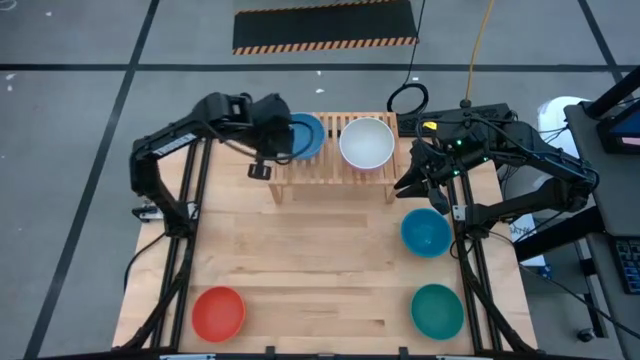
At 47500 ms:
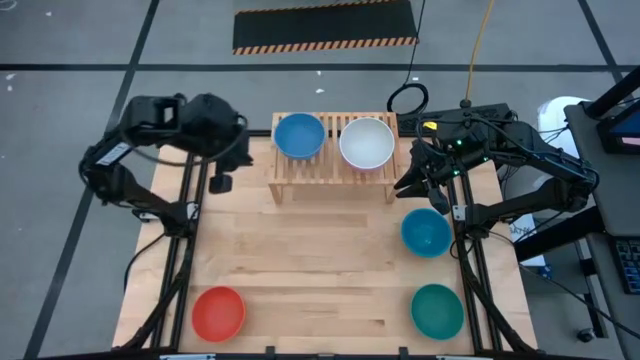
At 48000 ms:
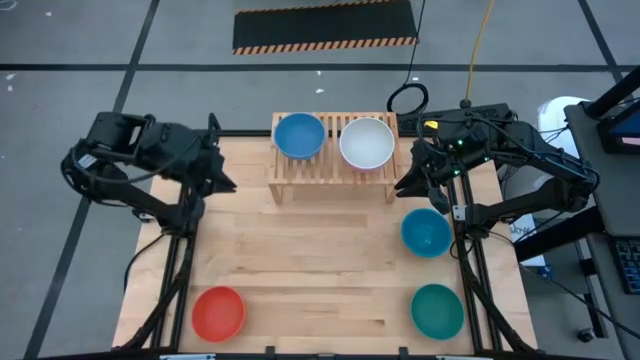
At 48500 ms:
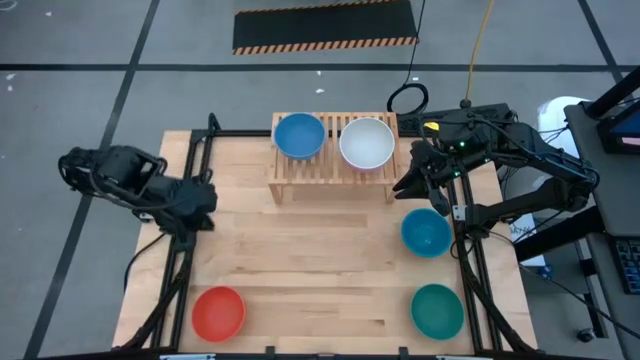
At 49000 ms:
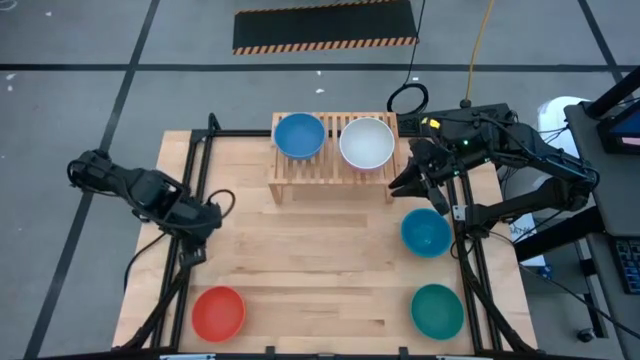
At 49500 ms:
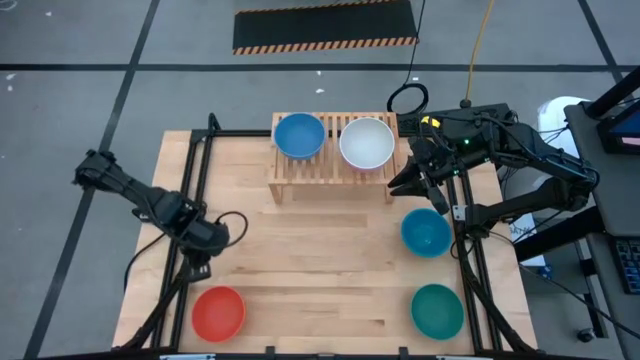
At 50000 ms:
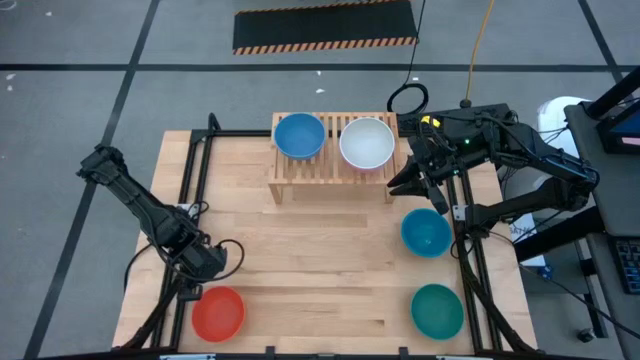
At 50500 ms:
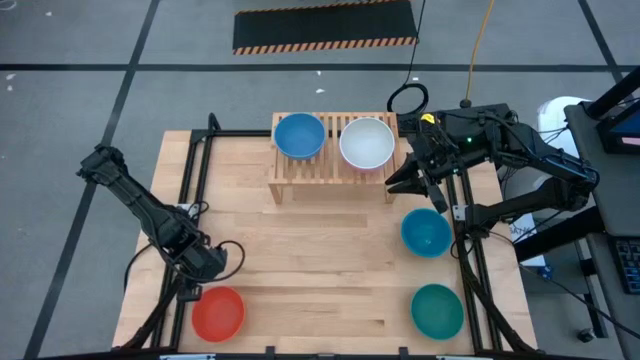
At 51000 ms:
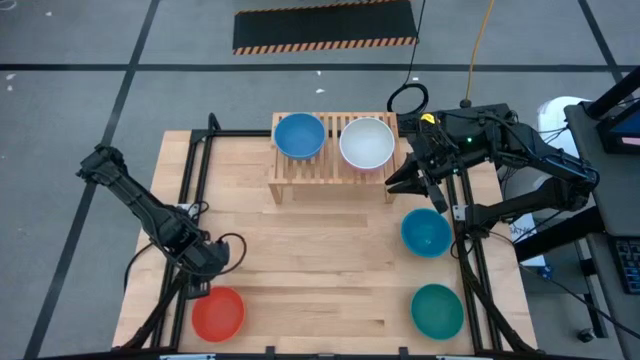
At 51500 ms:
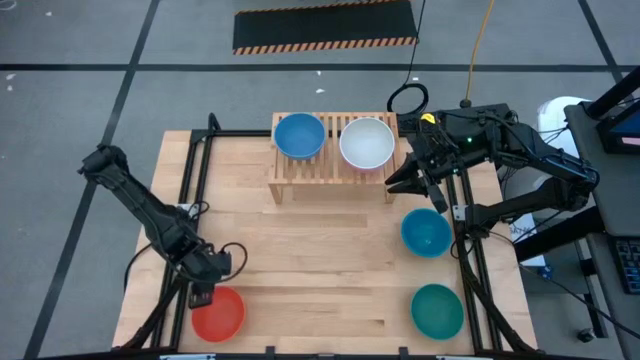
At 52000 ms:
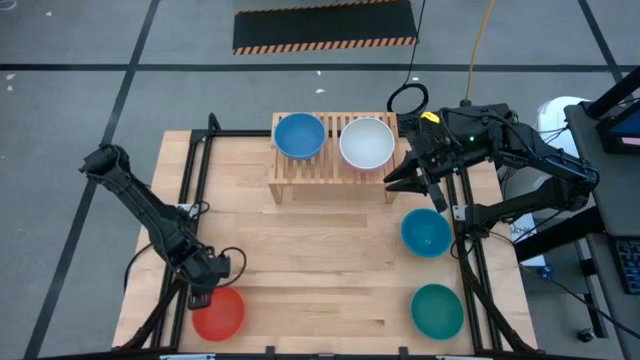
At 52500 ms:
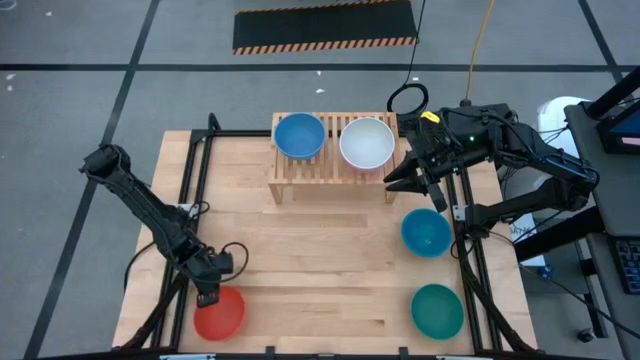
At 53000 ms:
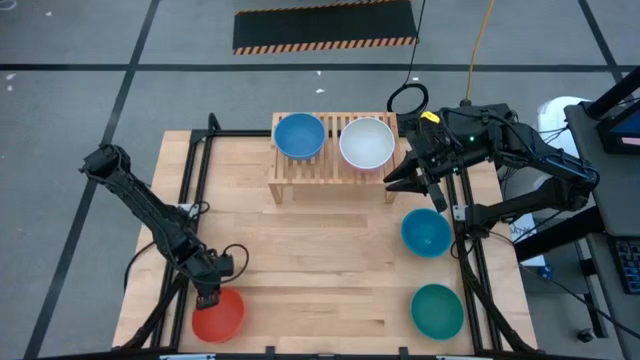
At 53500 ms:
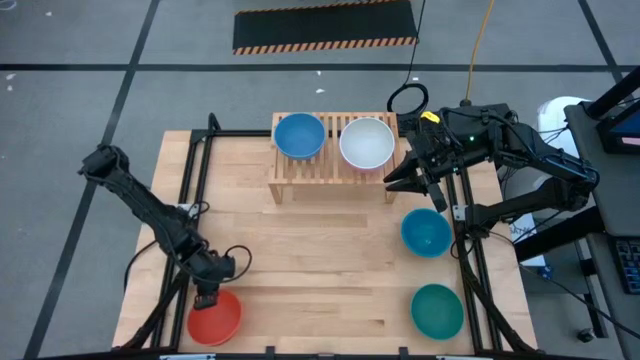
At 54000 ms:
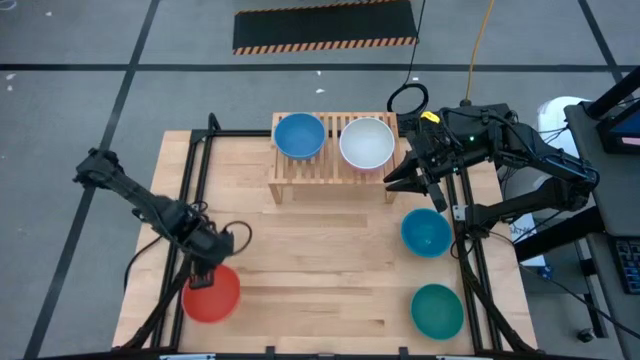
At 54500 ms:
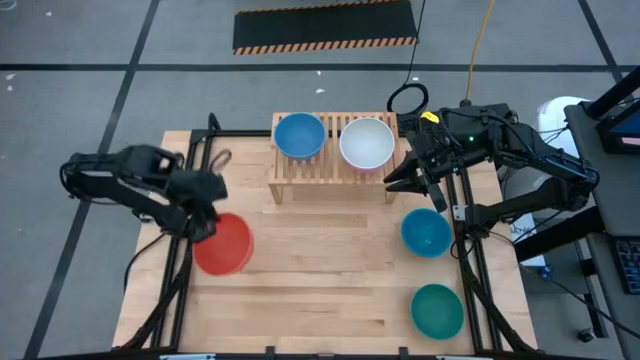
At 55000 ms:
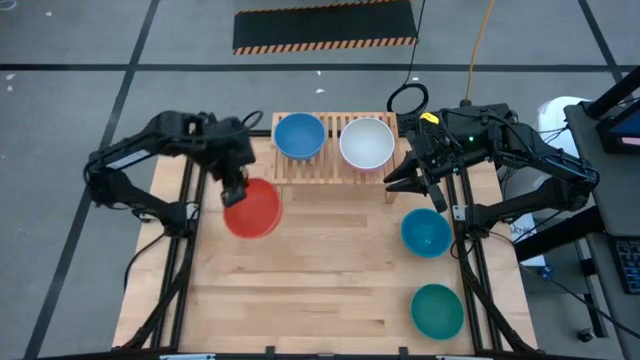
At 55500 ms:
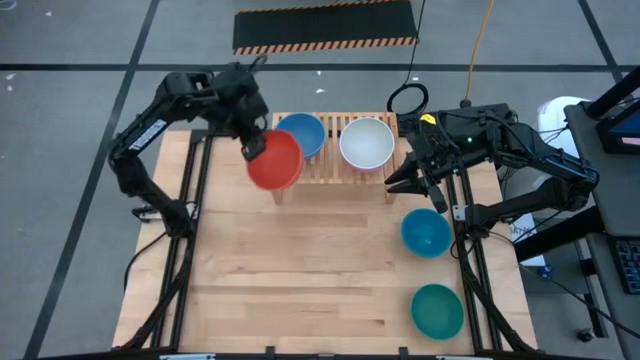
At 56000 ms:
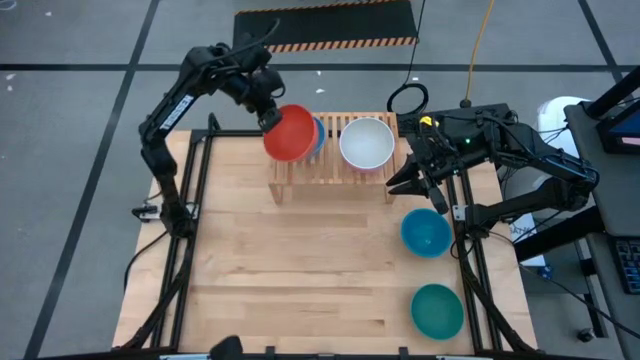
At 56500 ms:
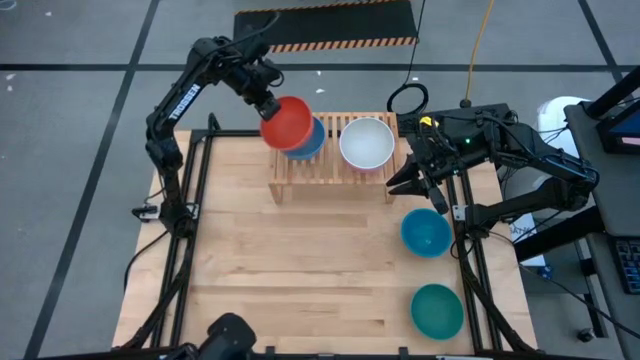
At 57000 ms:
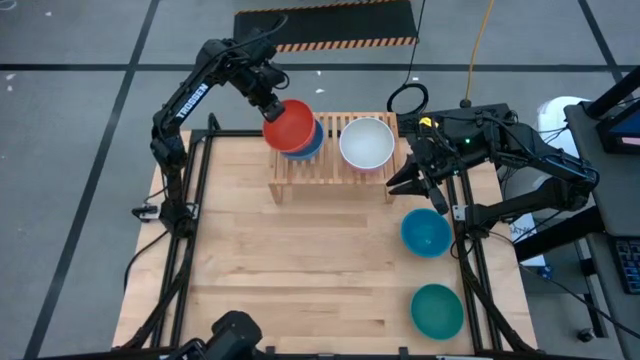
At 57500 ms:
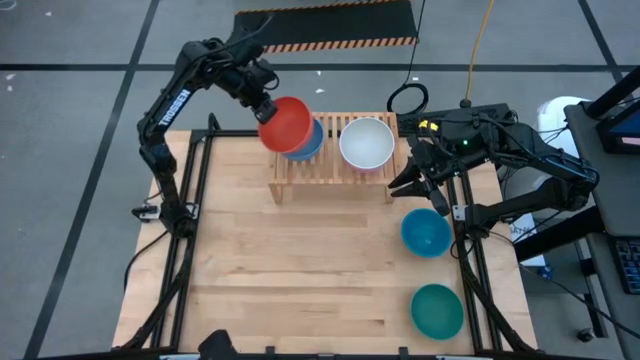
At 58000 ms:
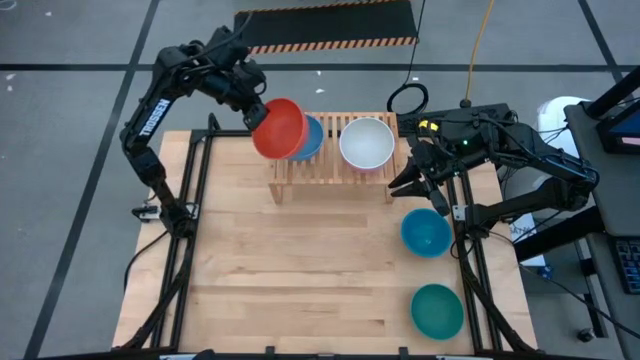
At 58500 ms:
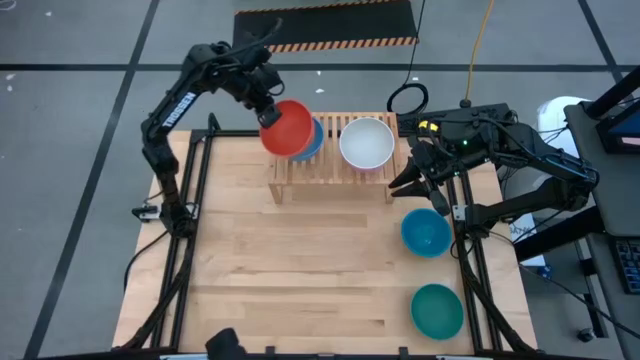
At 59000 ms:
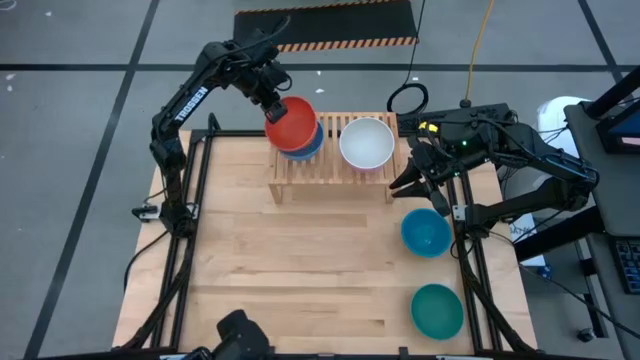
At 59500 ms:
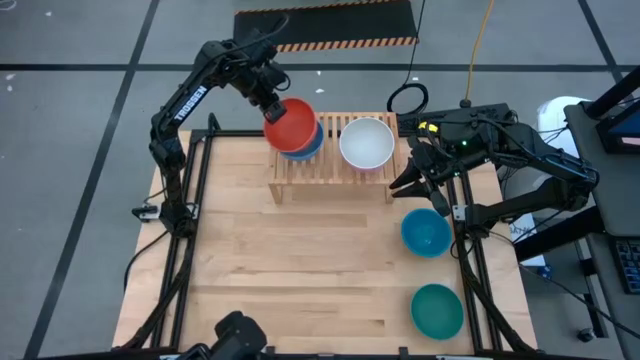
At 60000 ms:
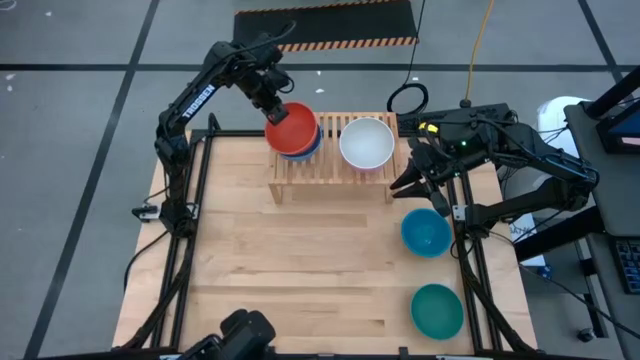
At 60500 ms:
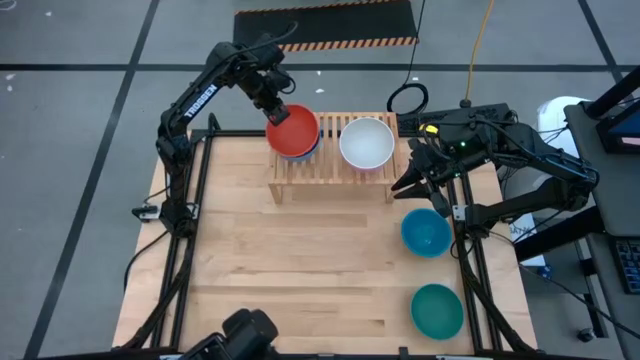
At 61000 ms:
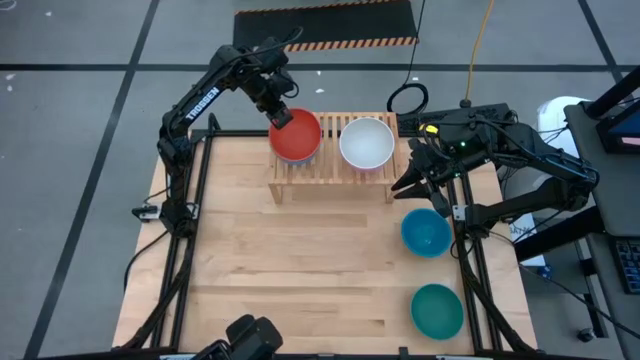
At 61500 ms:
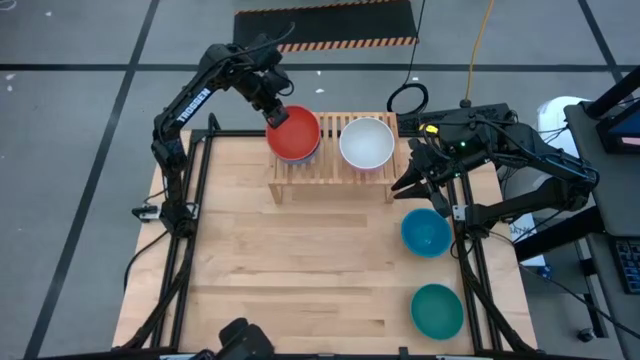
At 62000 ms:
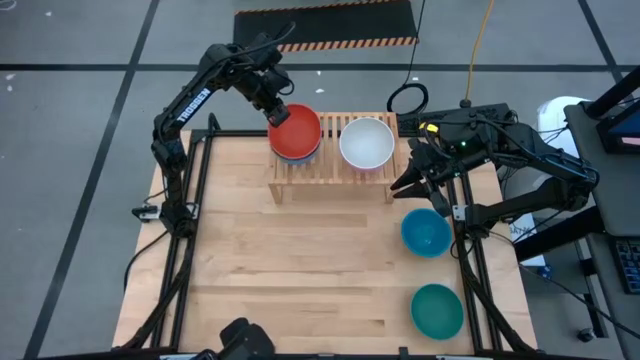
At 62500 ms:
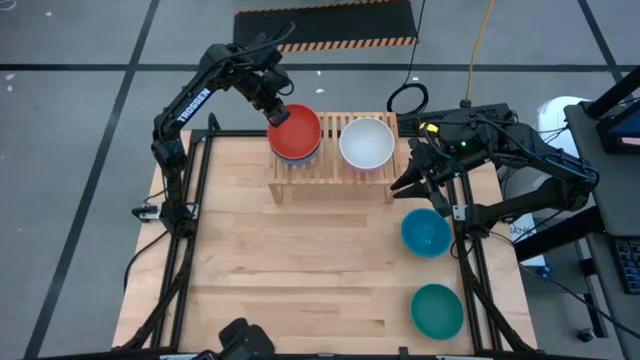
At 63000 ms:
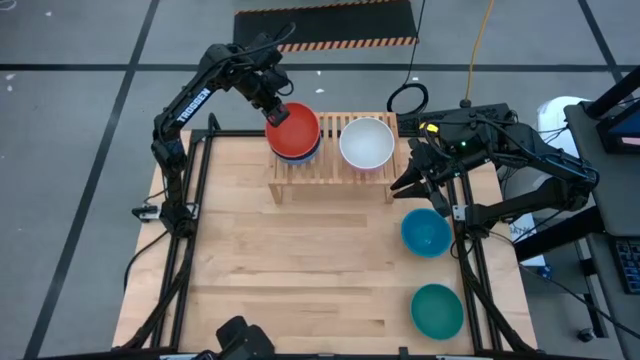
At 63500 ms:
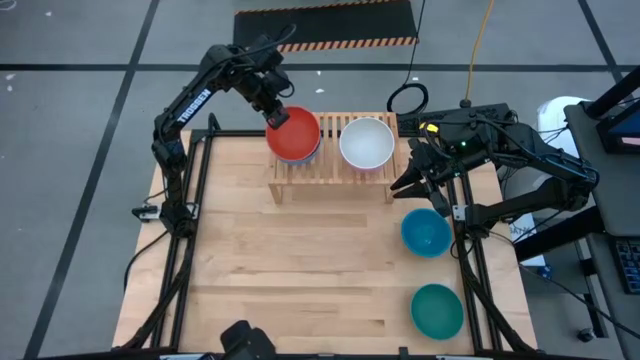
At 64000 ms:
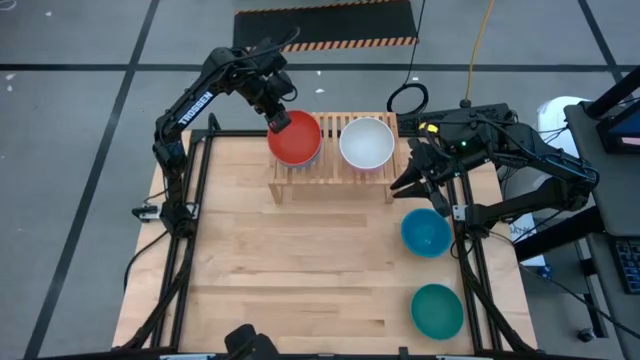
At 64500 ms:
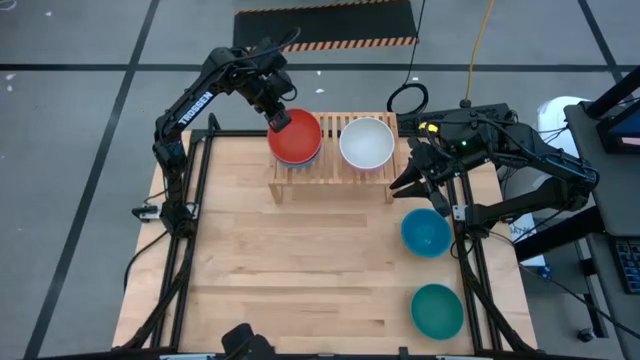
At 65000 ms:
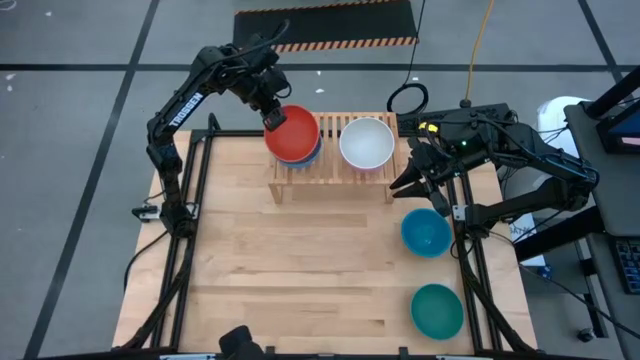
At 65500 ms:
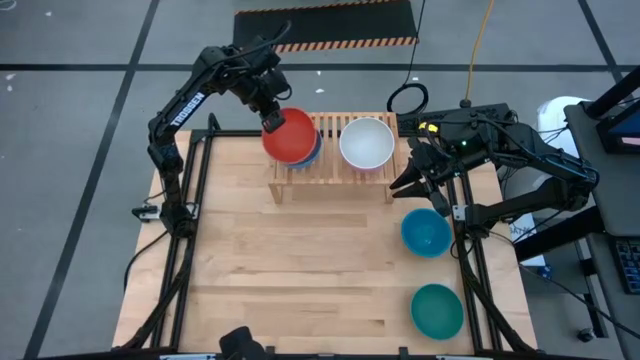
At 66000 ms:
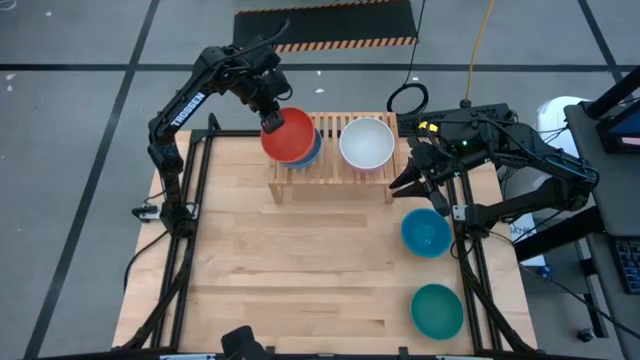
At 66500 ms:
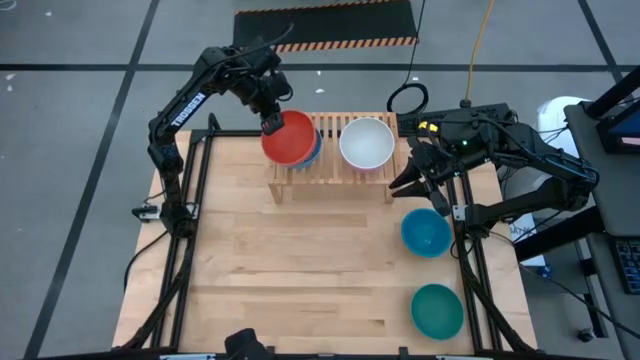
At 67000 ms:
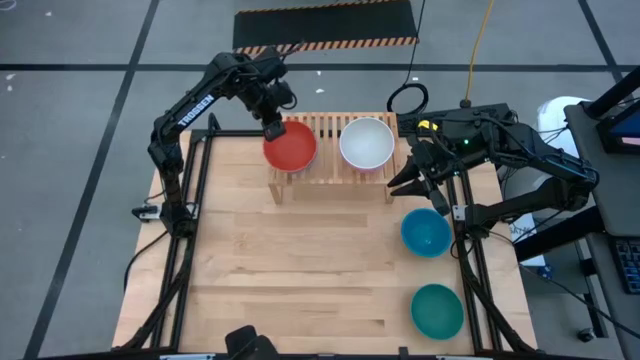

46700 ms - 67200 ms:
Task: Place and stack bowls onto a shelf
Stack the orange bowl on top of the light blue bowl on the shelf
